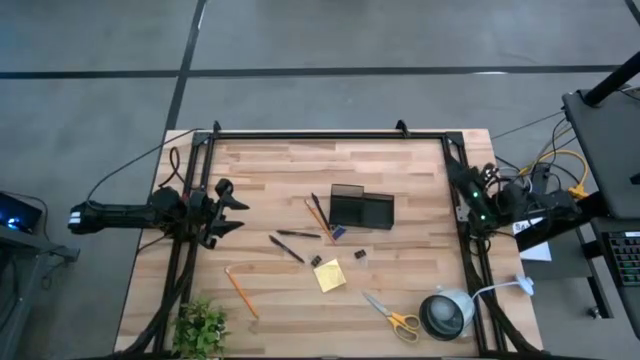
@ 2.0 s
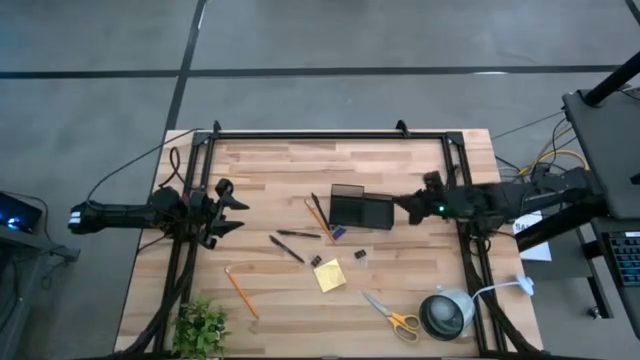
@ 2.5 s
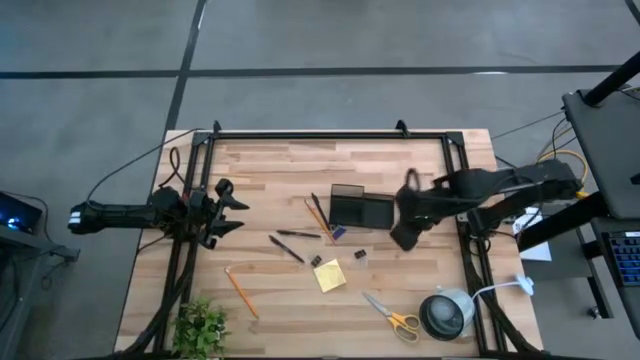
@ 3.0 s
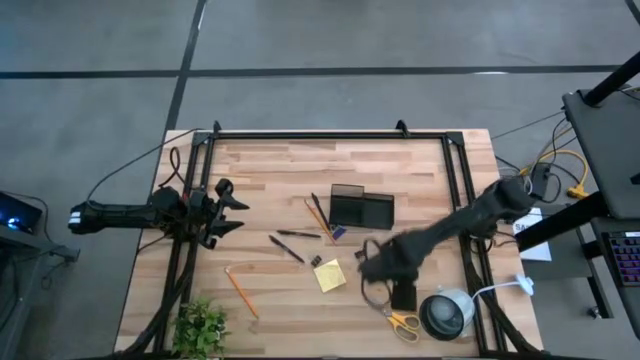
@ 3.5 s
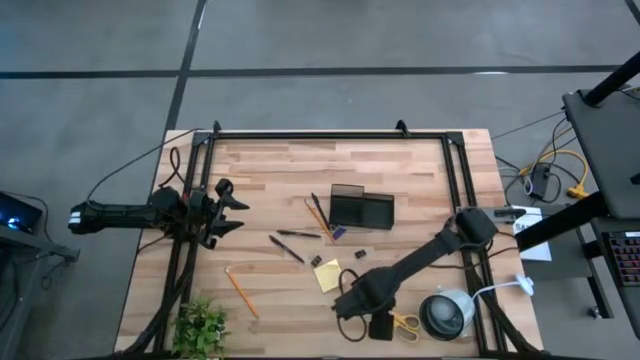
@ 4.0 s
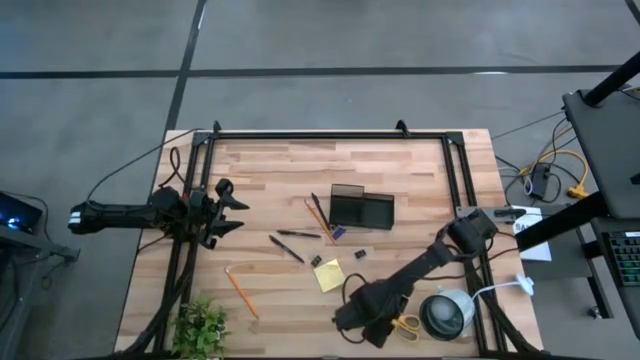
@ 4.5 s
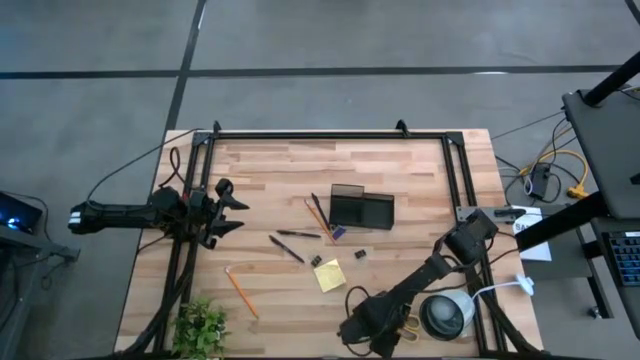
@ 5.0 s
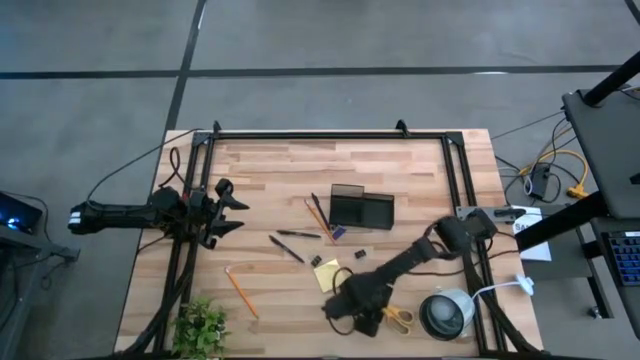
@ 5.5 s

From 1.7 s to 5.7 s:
Task: Pick and place office supplies into organizer
Put the yellow scissors into the black desk organizer

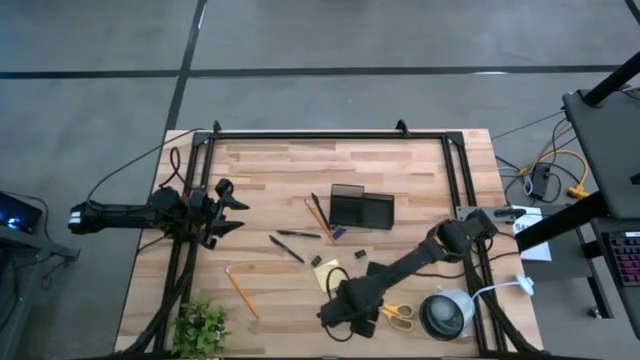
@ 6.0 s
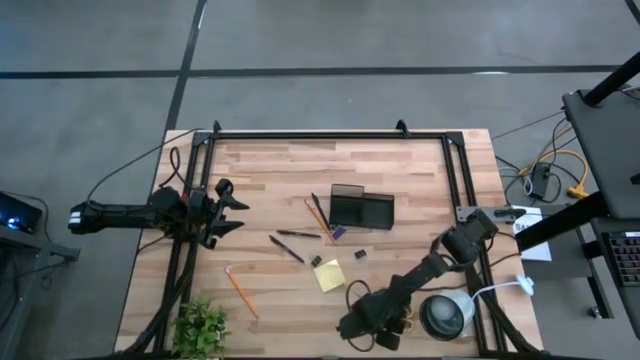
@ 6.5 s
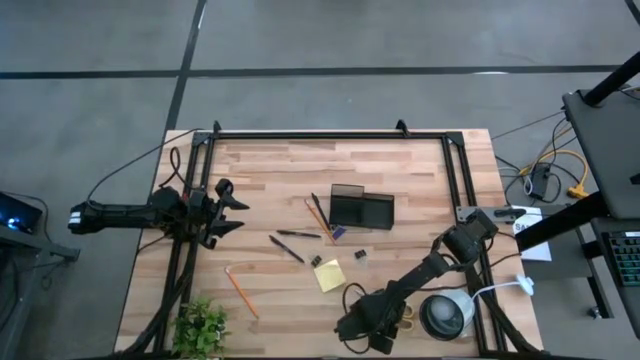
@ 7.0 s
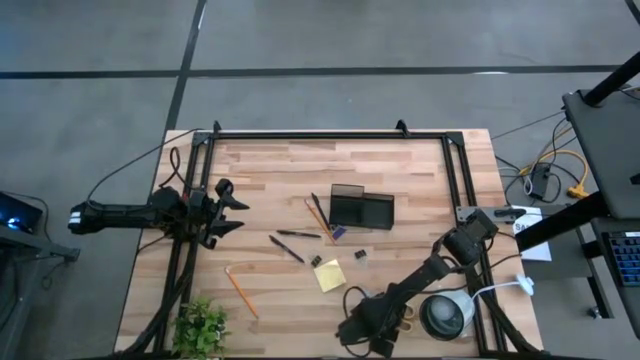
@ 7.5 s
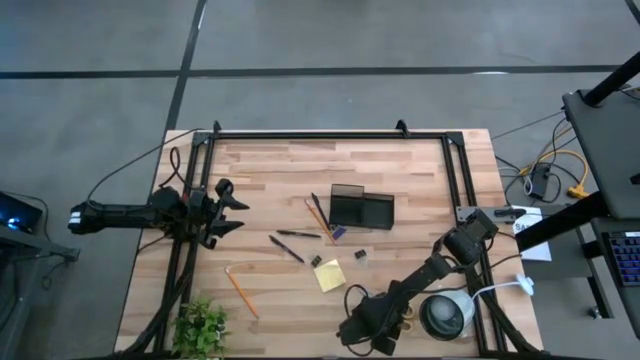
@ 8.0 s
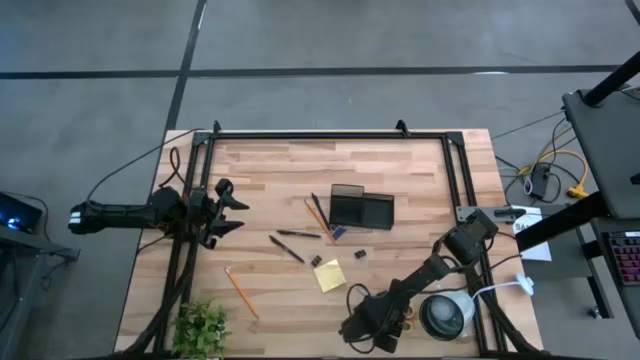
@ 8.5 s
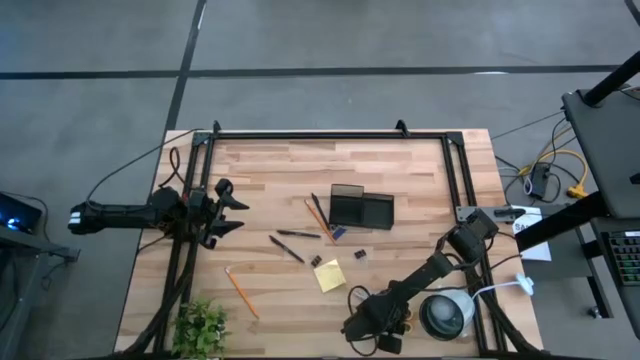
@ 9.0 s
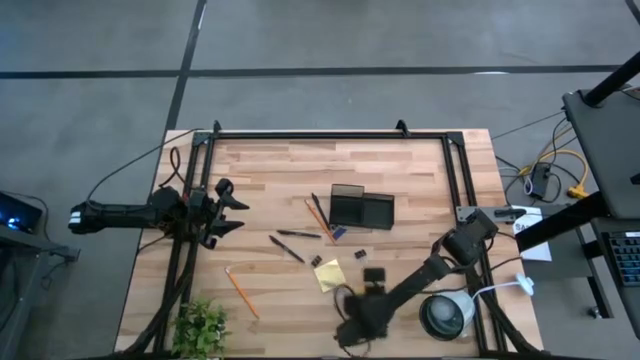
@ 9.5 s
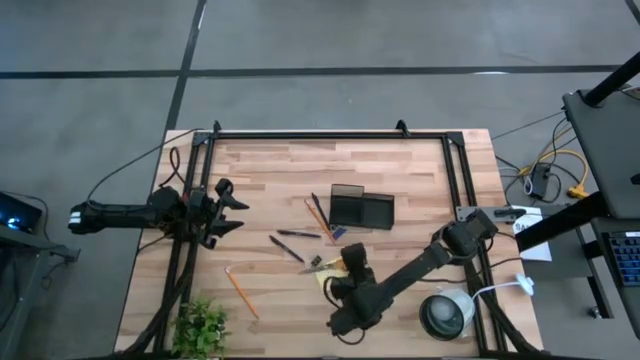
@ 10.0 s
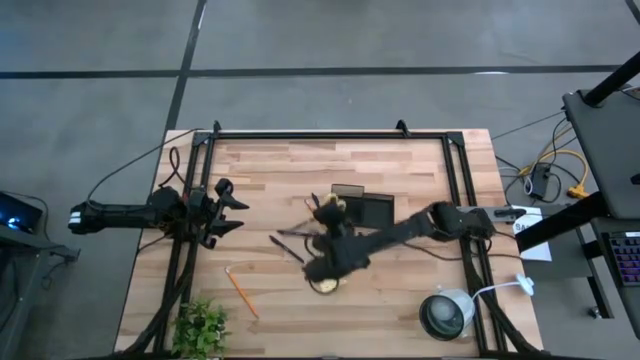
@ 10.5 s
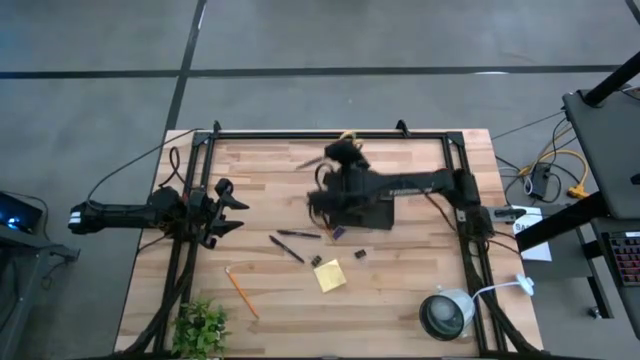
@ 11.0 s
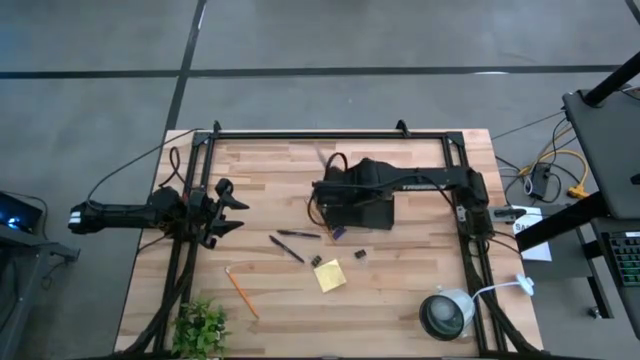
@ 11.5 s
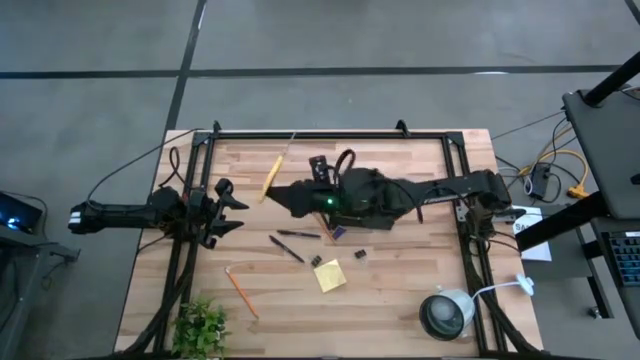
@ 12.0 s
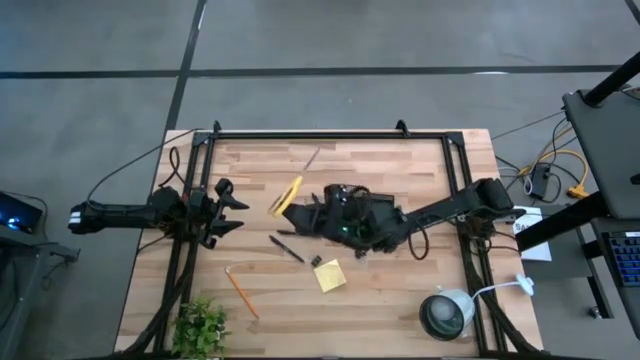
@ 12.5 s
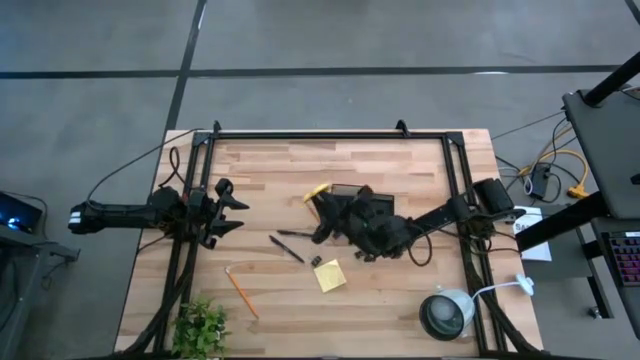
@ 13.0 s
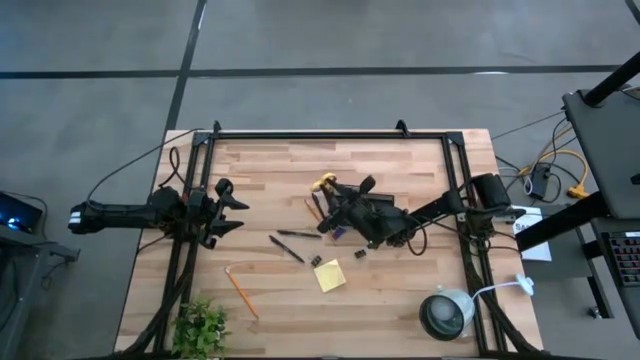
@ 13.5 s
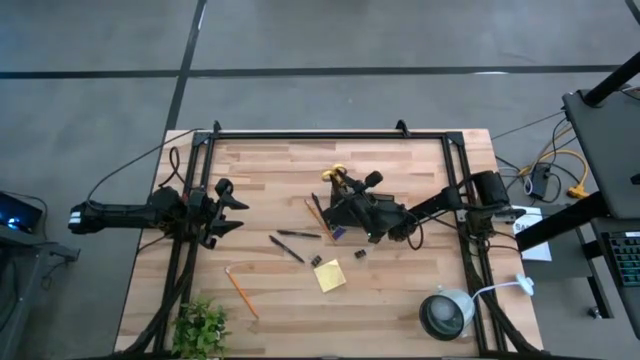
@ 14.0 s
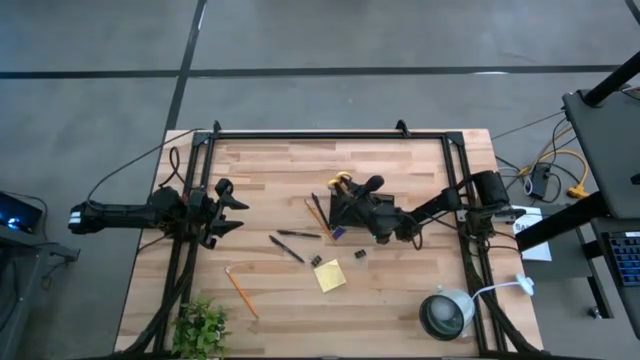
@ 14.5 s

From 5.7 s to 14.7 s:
Put the yellow scissors into the black desk organizer

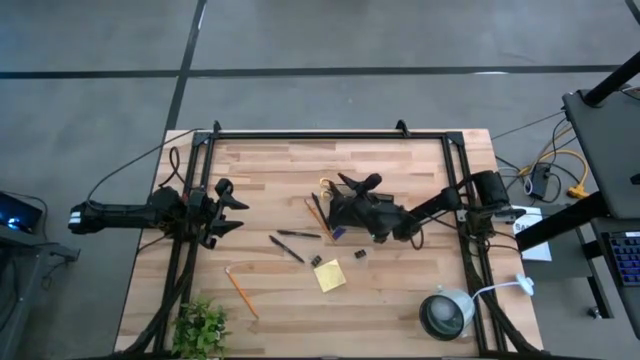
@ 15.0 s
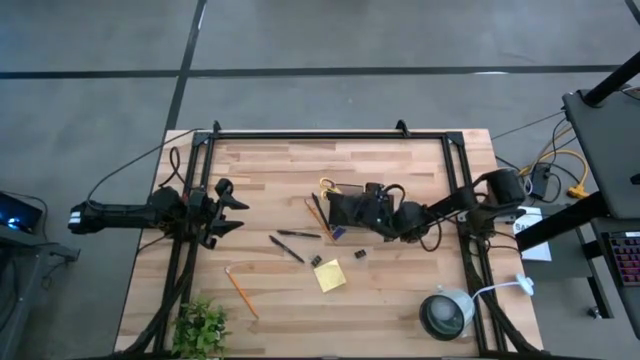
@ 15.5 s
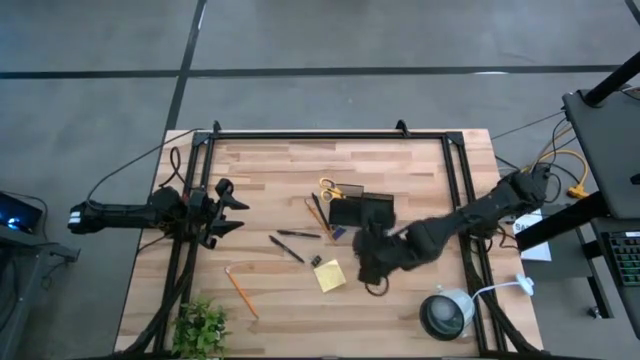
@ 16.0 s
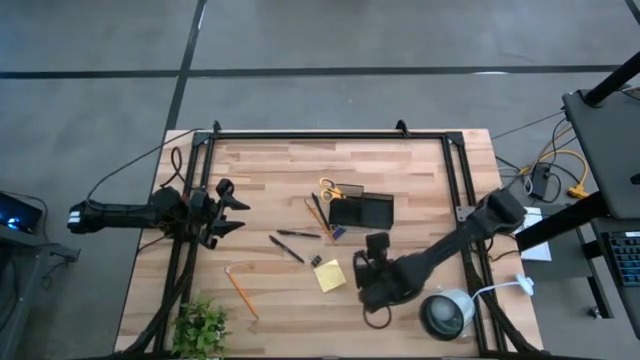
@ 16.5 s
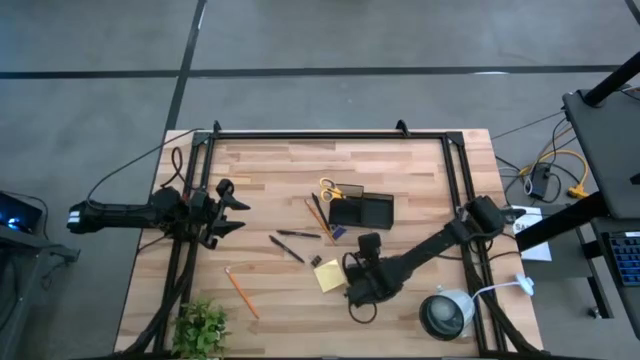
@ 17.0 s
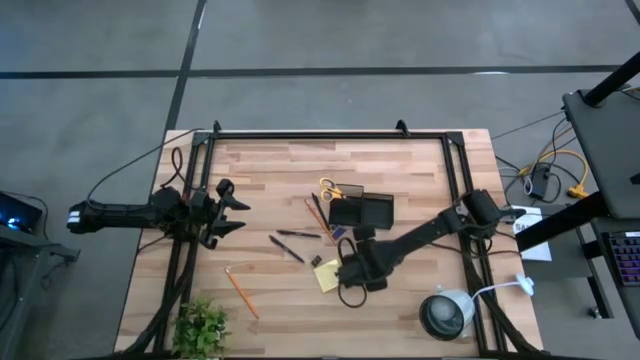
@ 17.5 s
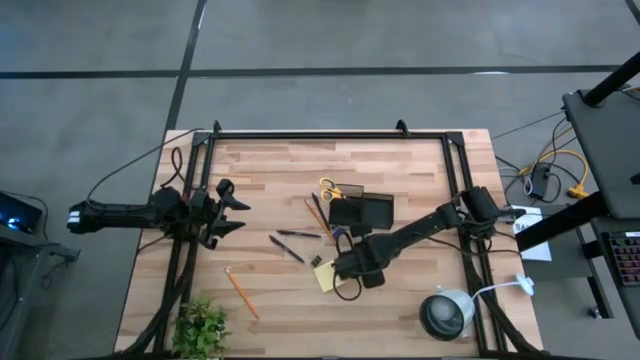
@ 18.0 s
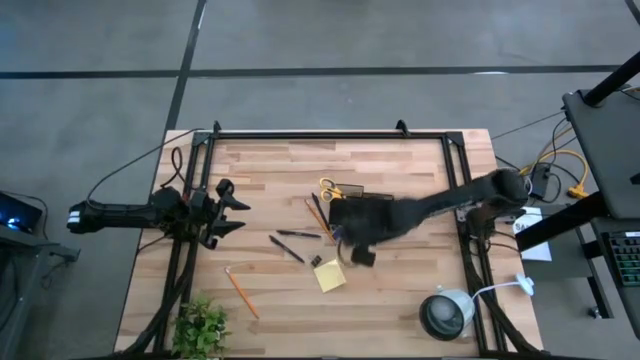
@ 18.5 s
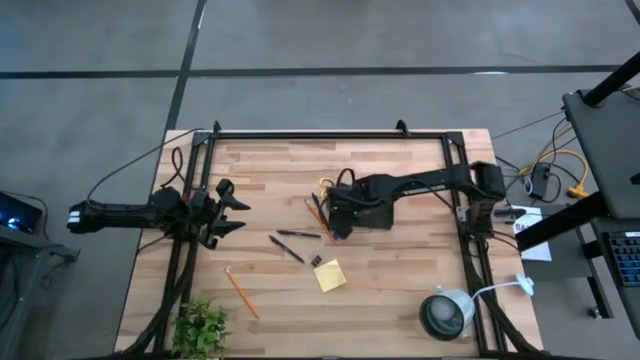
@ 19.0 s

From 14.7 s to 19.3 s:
Put the bottom right black binder clip into the black desk organizer

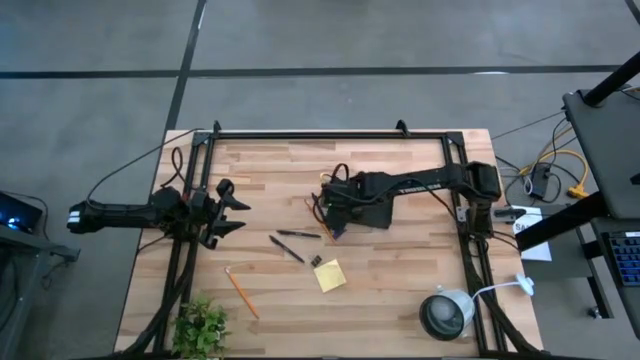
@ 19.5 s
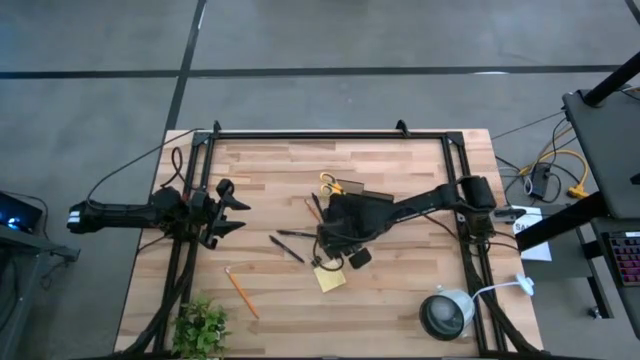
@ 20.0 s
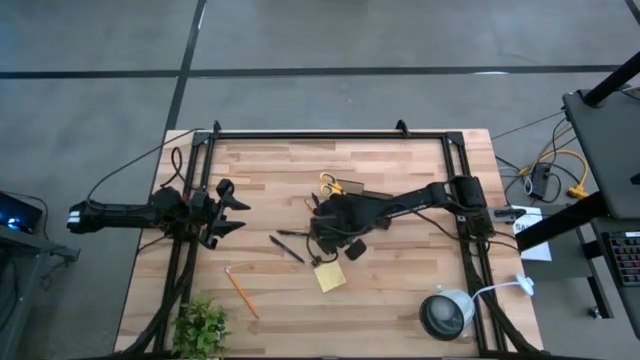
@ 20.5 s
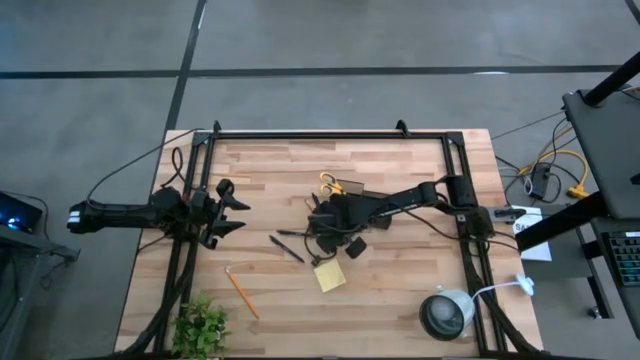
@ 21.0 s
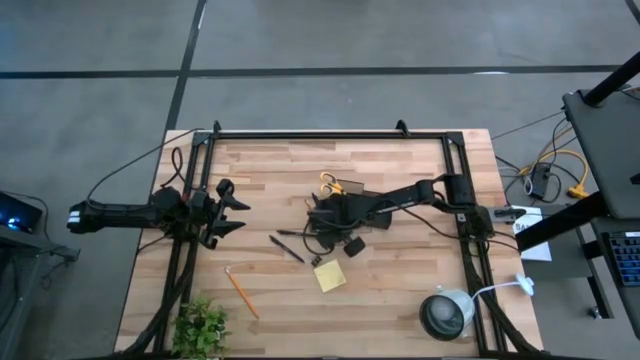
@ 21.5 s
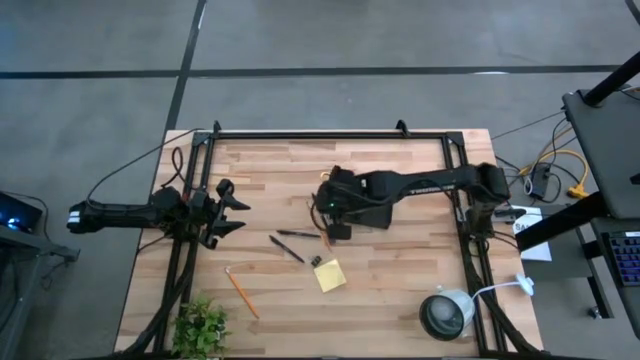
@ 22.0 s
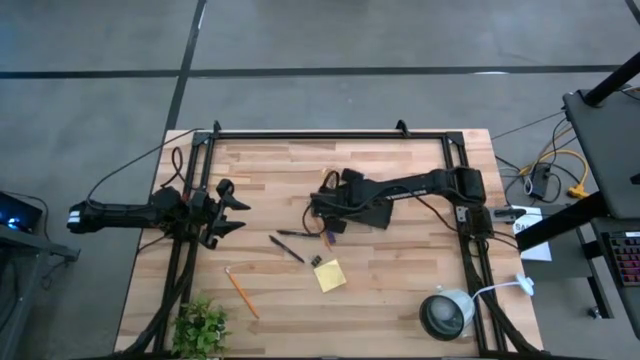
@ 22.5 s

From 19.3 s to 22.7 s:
Put the top black binder clip into the black desk organizer

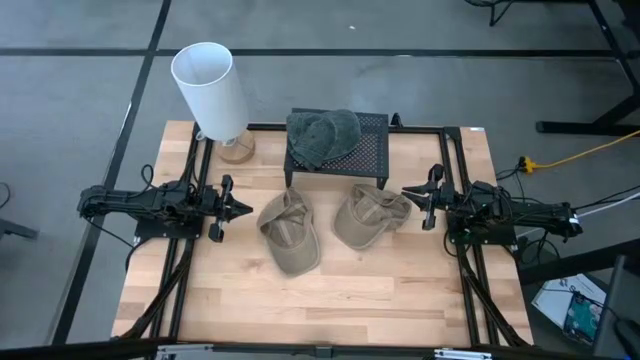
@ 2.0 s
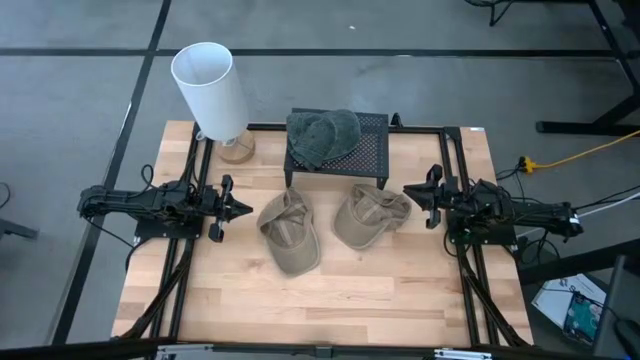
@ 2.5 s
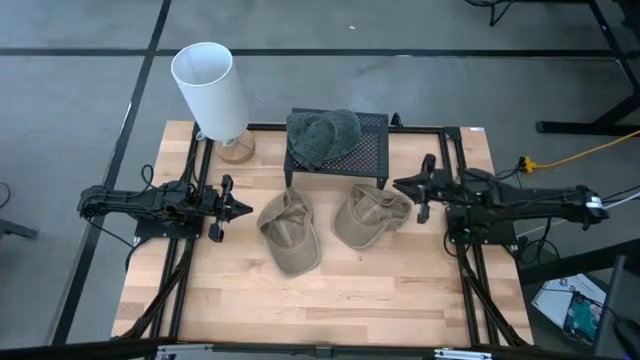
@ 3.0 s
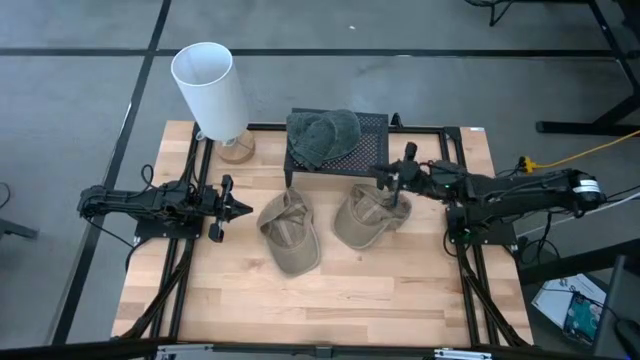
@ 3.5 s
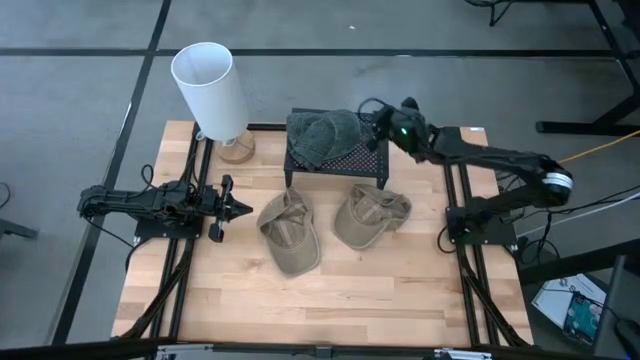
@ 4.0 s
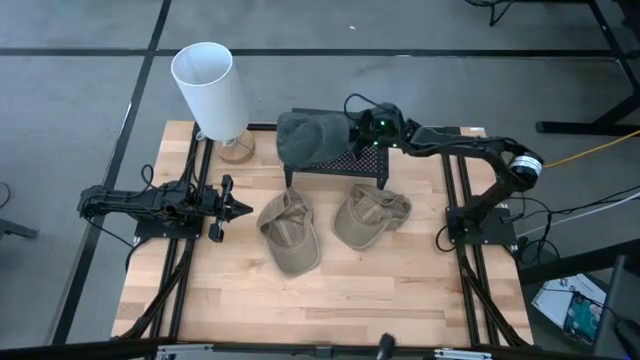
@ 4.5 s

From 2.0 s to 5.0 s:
Task: Pick & Place hat
Remove the black cap from the shelf
